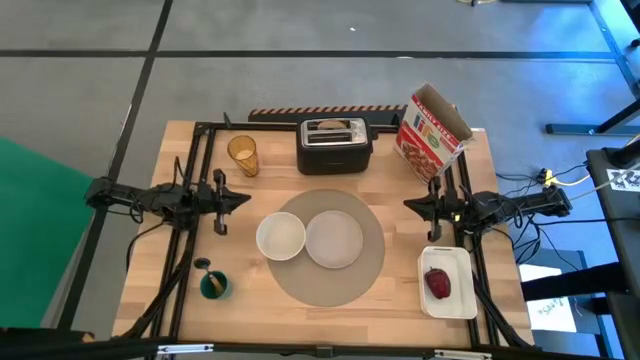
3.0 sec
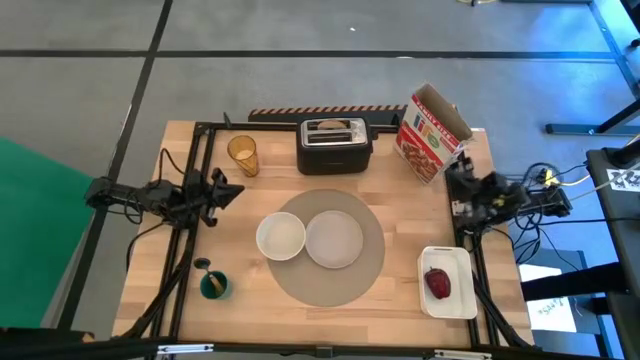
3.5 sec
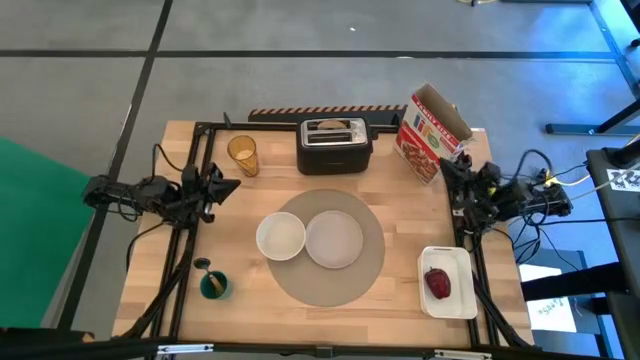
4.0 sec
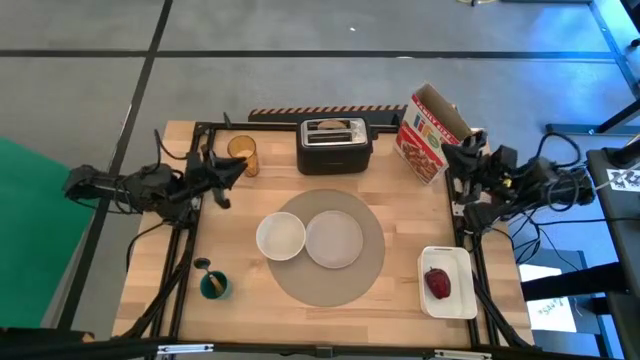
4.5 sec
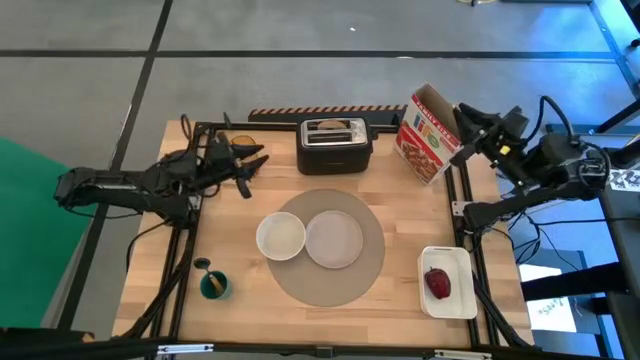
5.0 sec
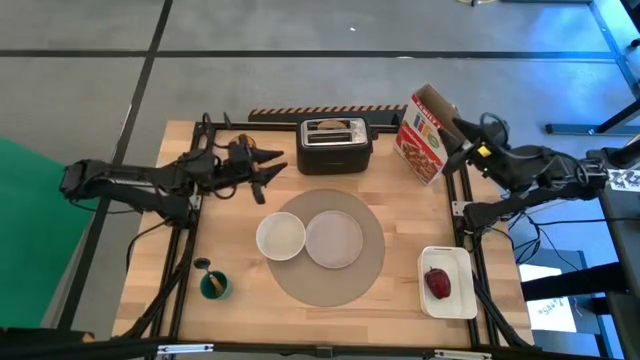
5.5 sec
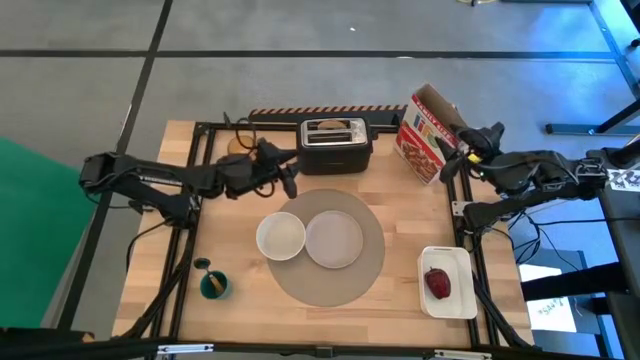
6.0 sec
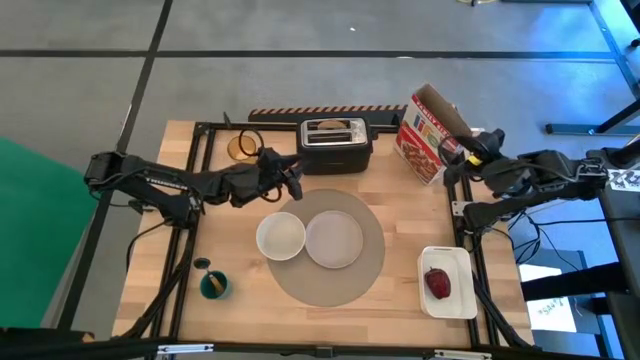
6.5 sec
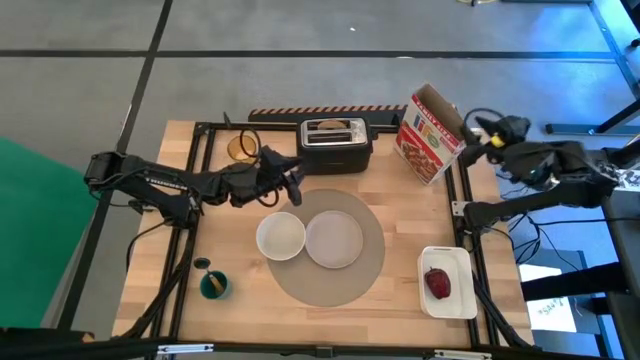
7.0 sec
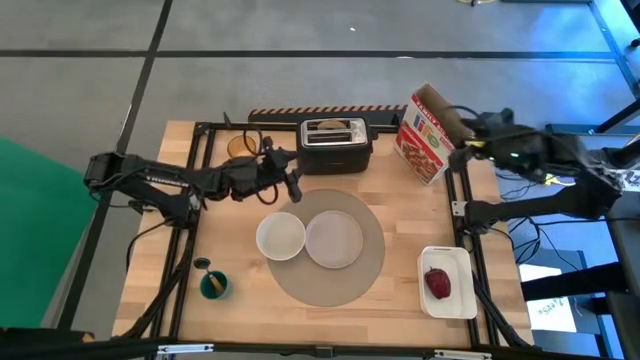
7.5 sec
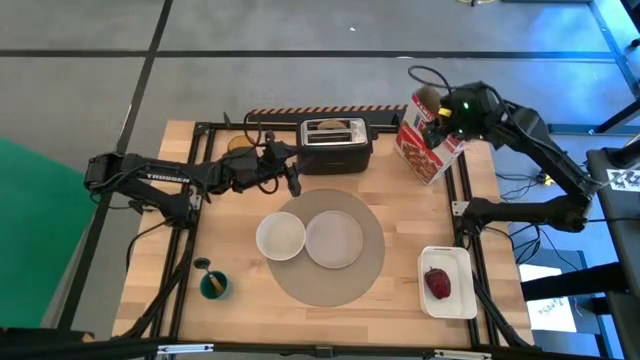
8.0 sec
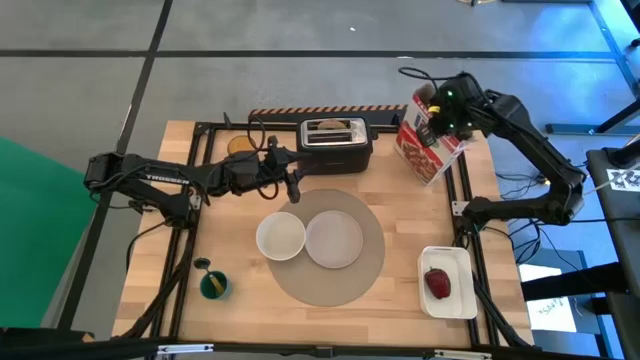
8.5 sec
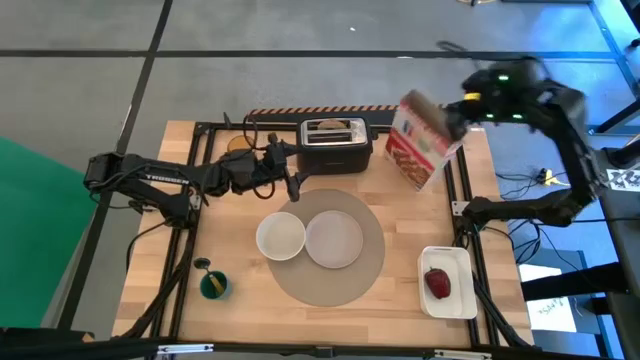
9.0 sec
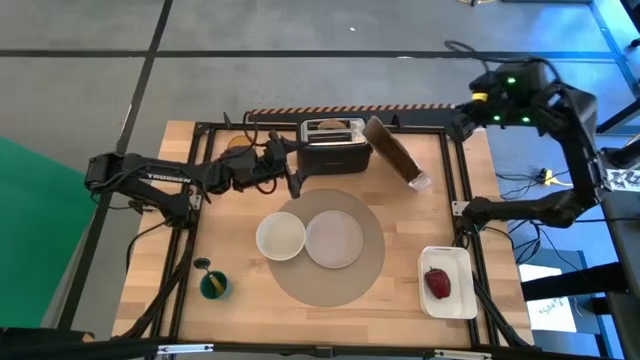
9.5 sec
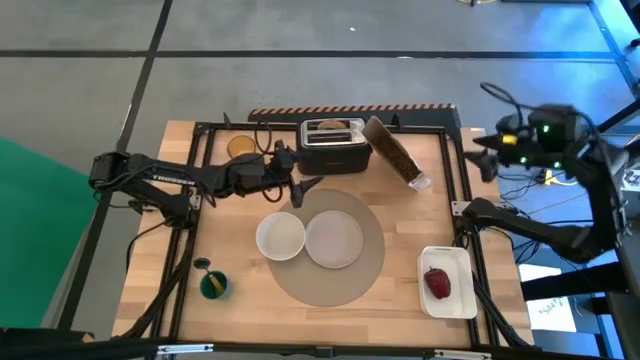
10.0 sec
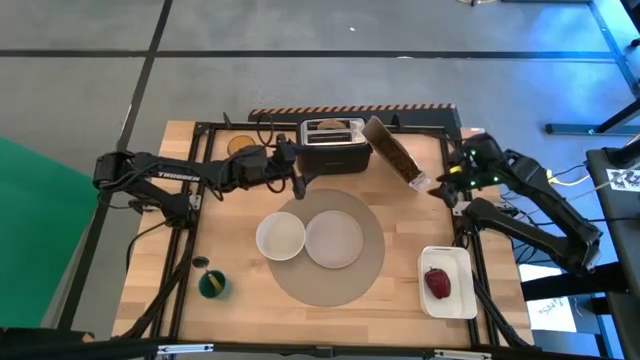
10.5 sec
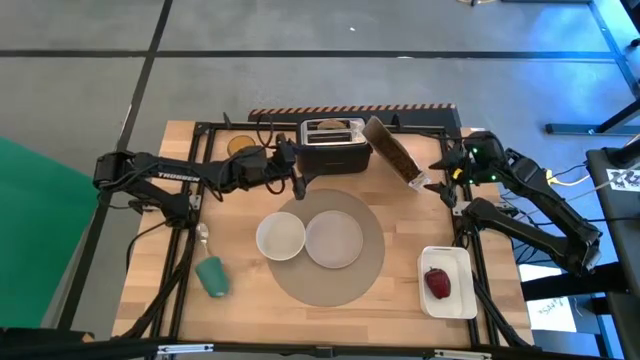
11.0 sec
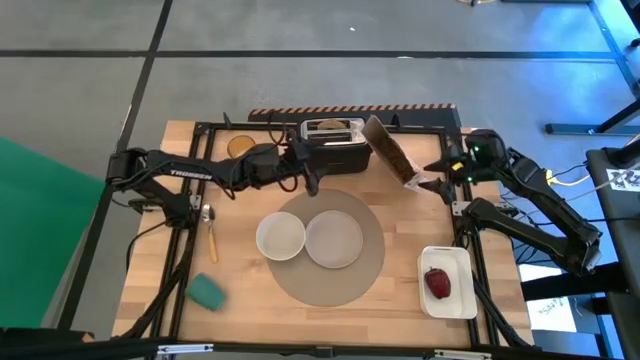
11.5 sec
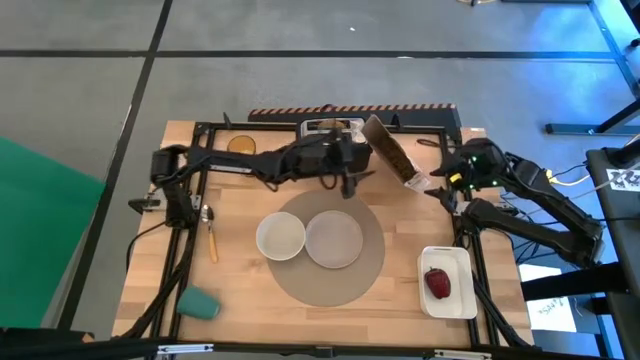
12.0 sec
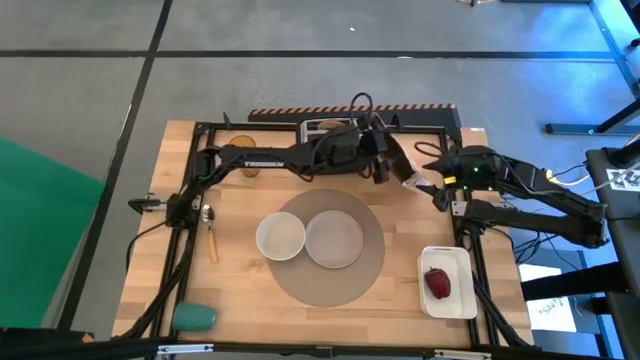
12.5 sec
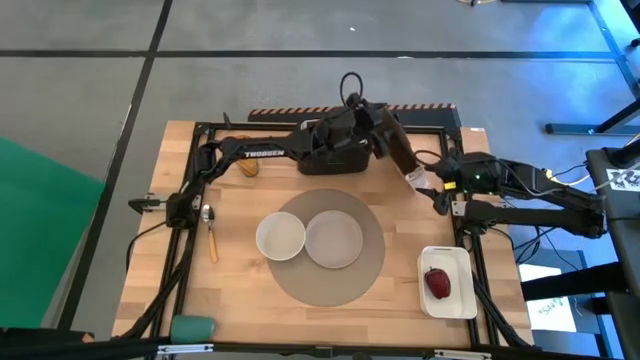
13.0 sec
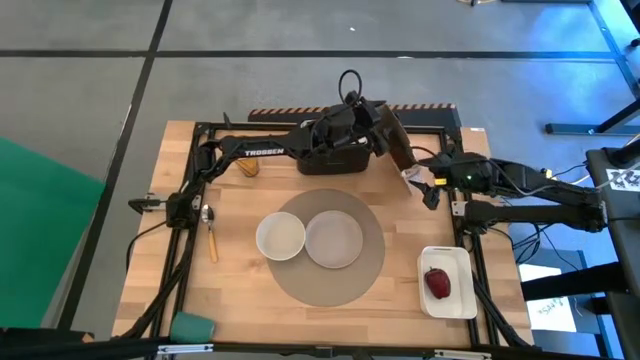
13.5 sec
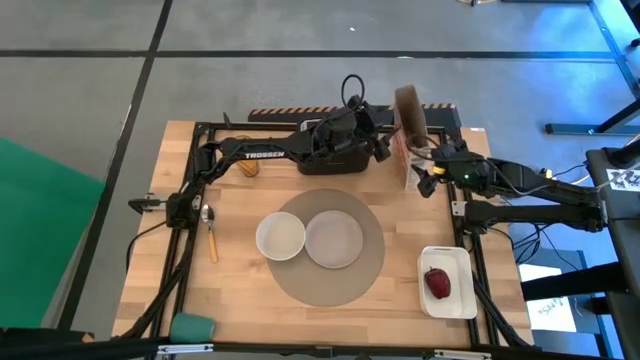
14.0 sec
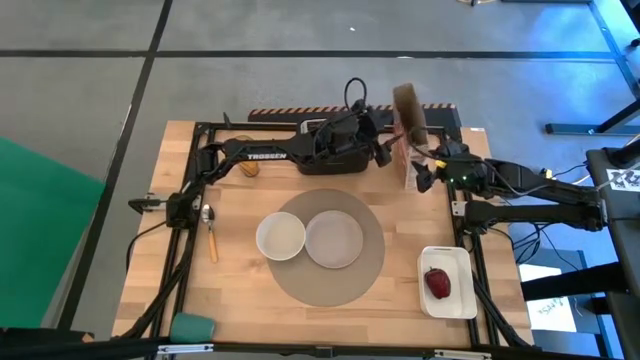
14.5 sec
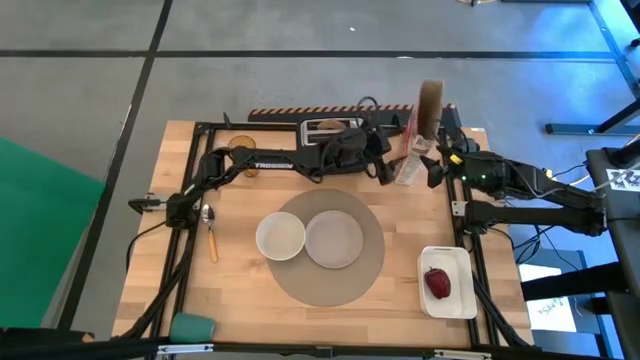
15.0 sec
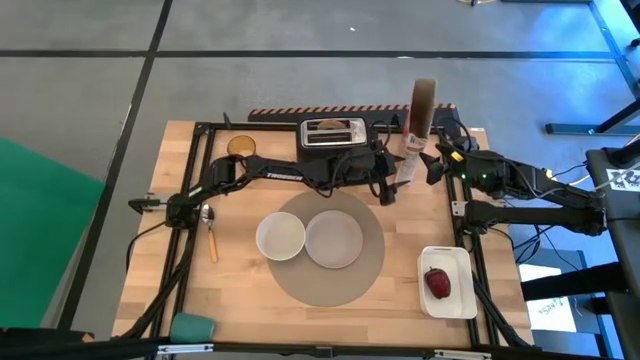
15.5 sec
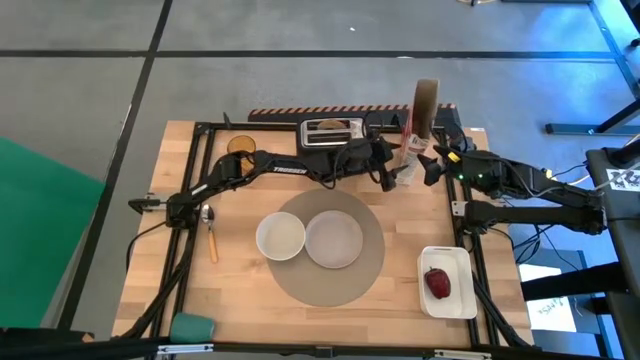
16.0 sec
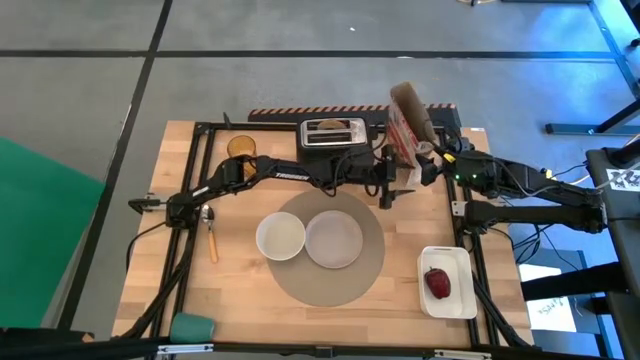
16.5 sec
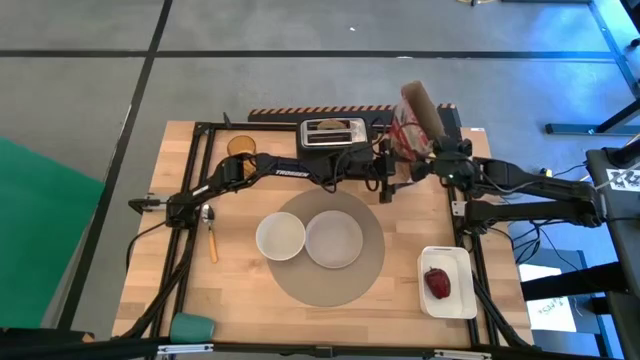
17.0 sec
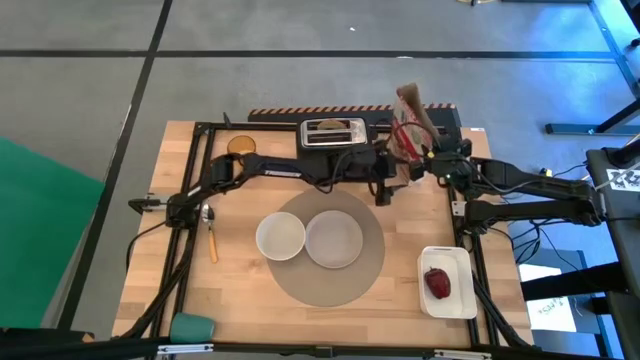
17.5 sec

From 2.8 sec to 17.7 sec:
Task: Arrange a breakfast setting
Pour the cereal from the cereal box into the white bowl

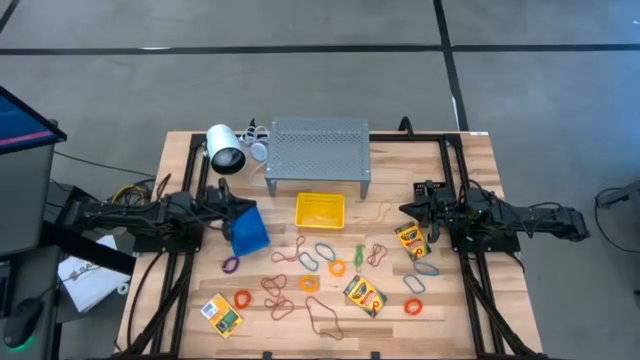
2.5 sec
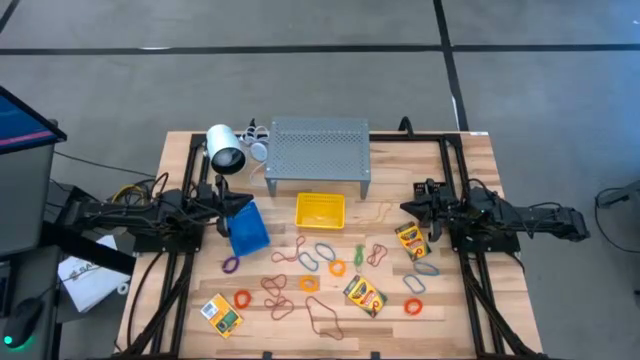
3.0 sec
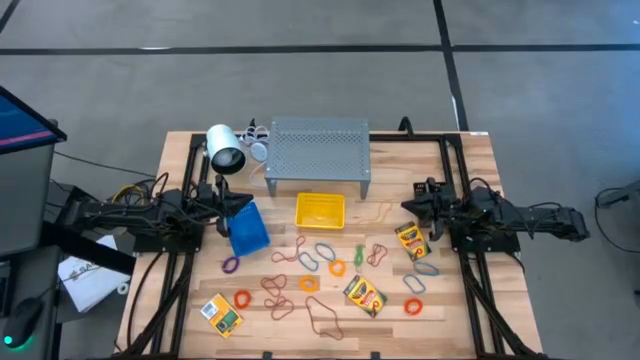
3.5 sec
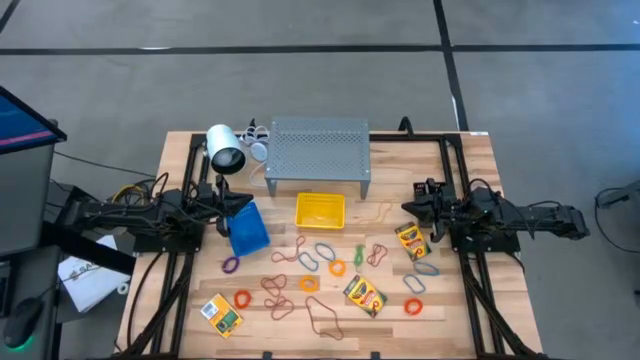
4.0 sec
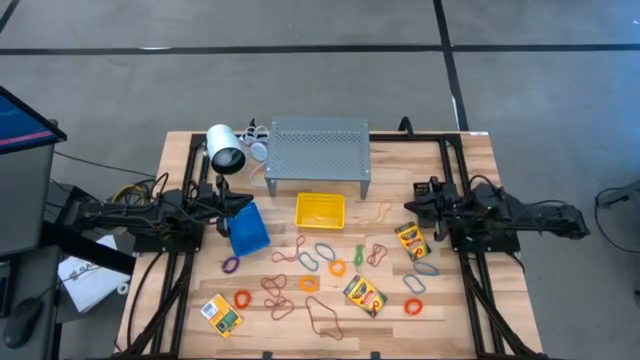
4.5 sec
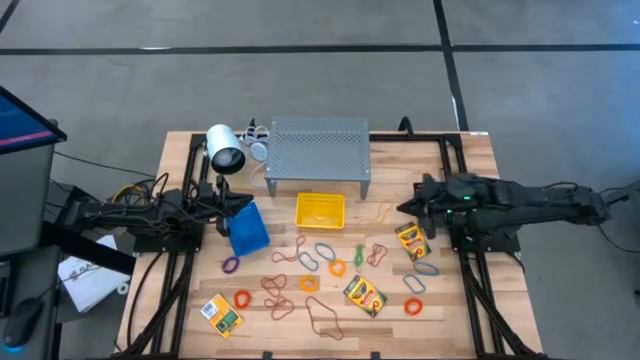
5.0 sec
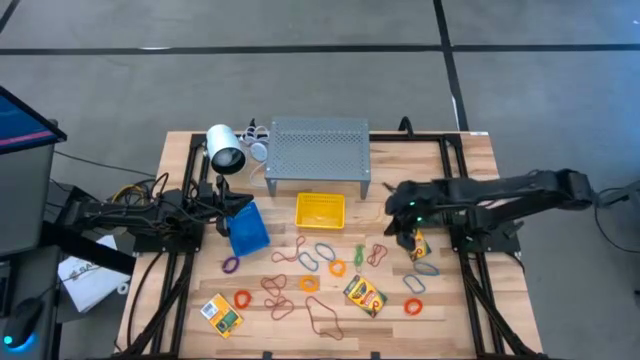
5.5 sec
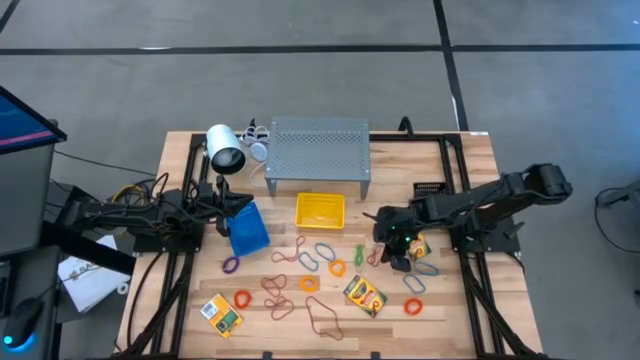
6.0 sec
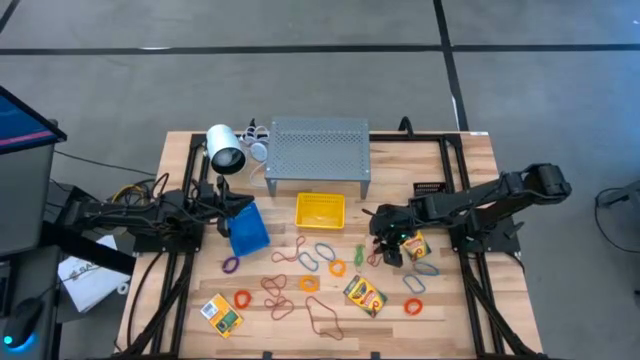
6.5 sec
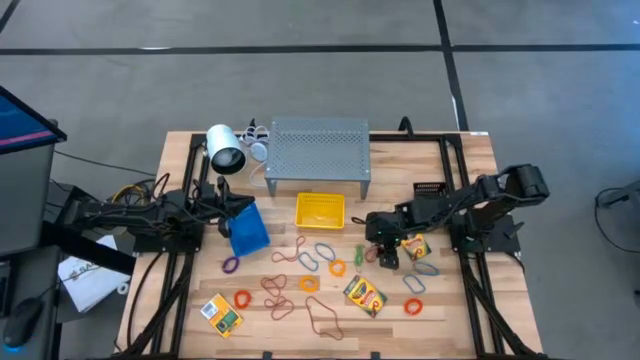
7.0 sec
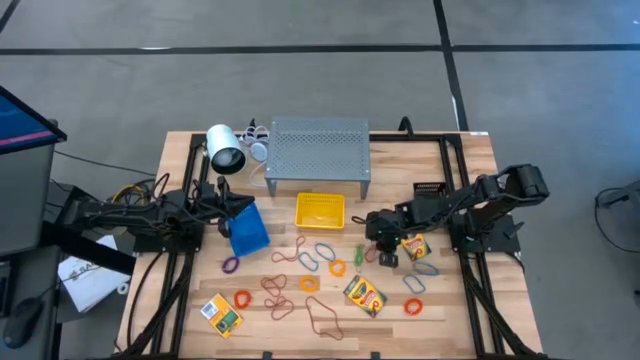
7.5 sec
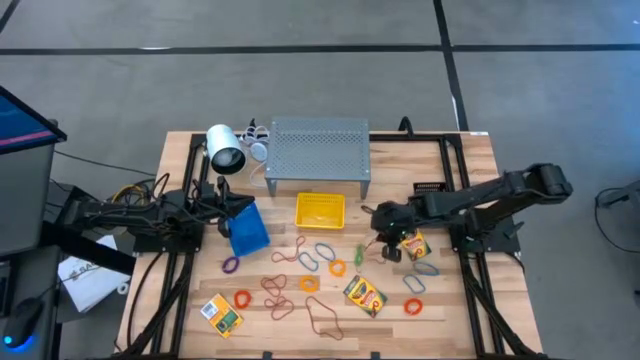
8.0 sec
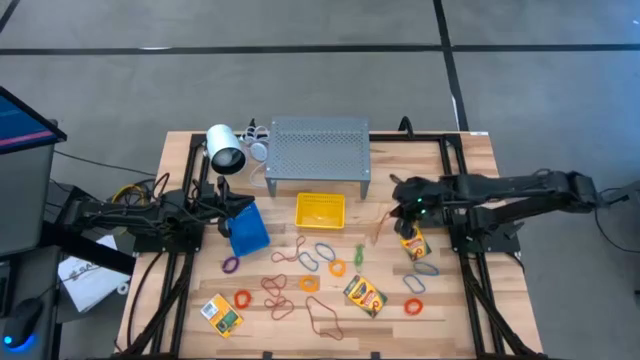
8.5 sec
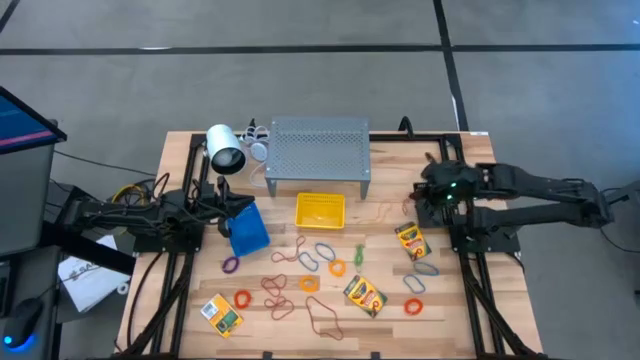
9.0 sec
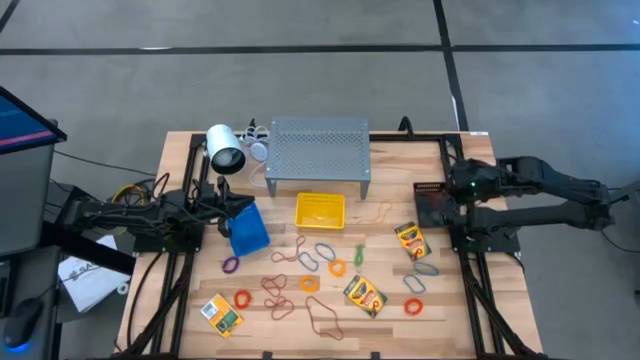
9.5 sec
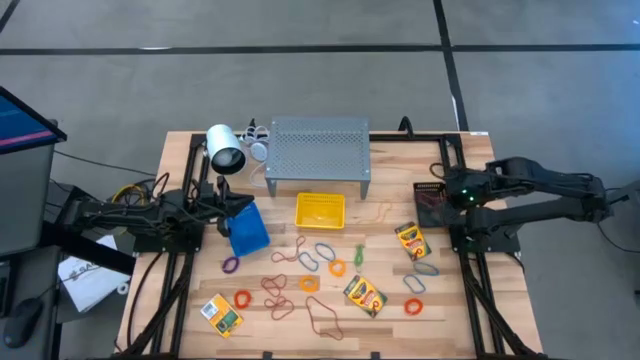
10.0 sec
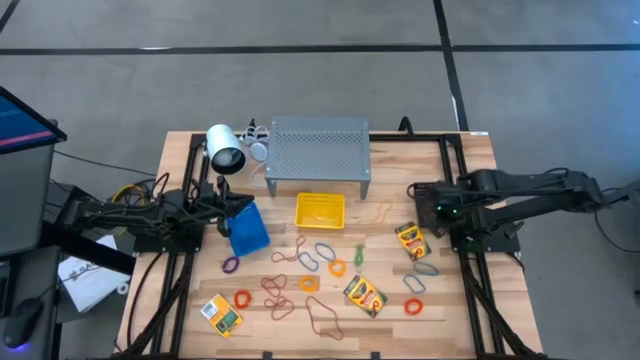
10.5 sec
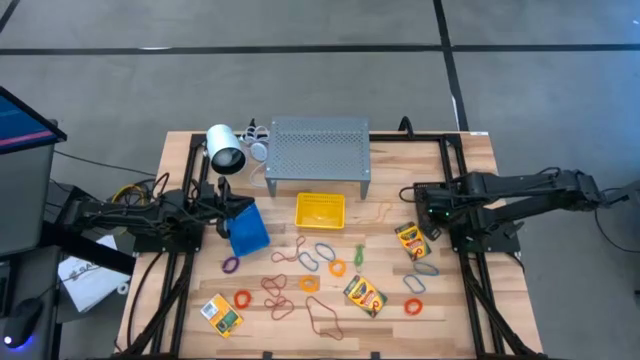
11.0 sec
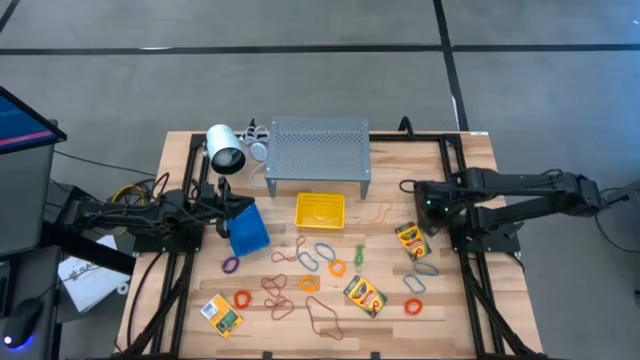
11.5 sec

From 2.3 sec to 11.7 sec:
Task: Pick & Place Office Desk Supplies
Put the red rubber band into the black bin
